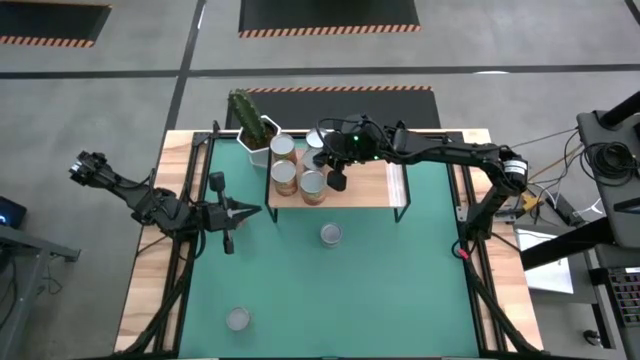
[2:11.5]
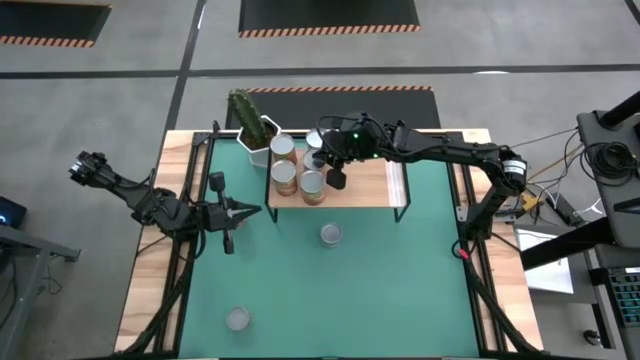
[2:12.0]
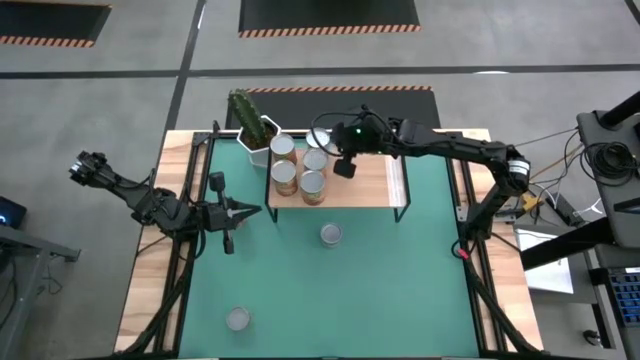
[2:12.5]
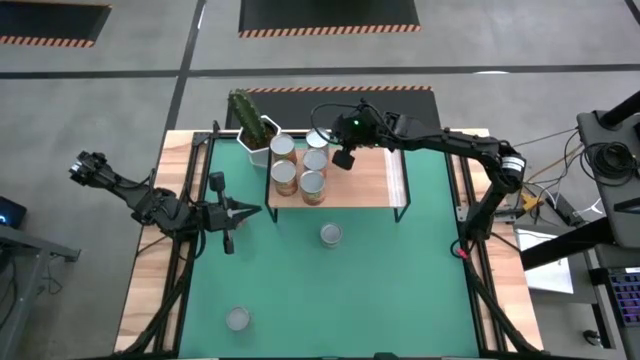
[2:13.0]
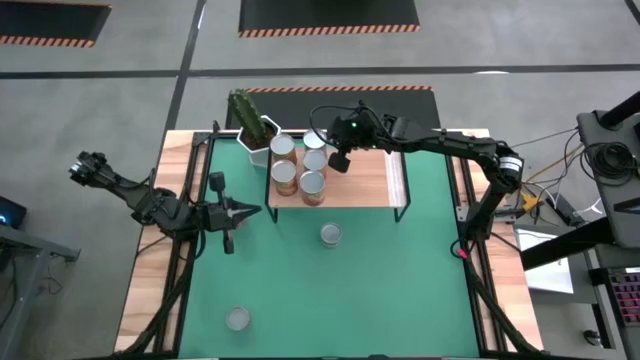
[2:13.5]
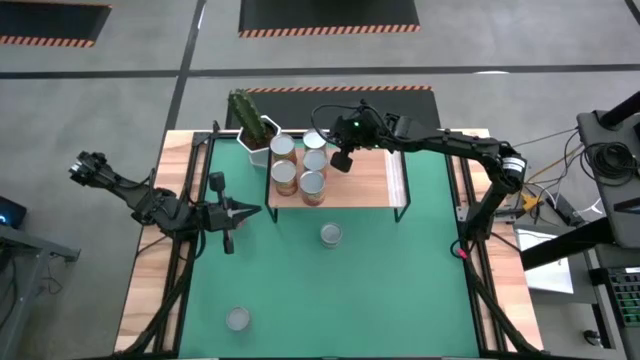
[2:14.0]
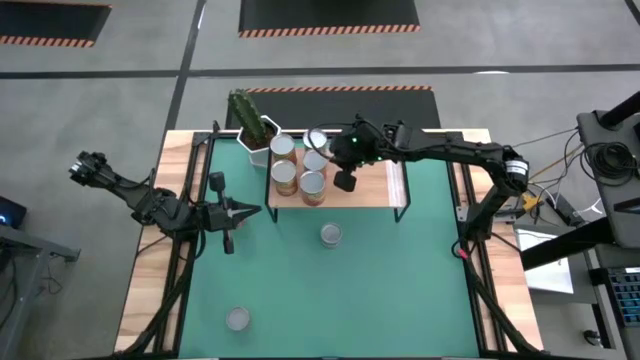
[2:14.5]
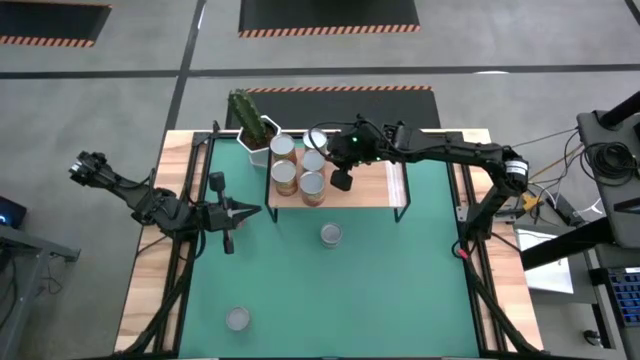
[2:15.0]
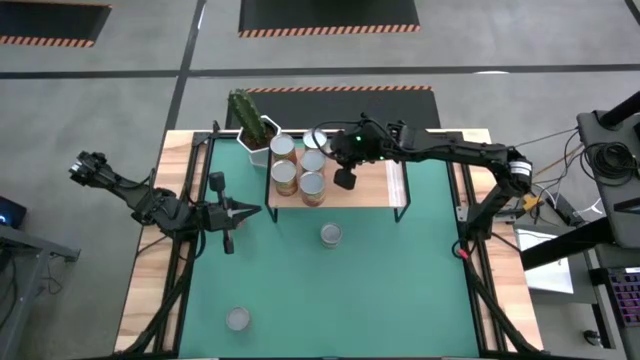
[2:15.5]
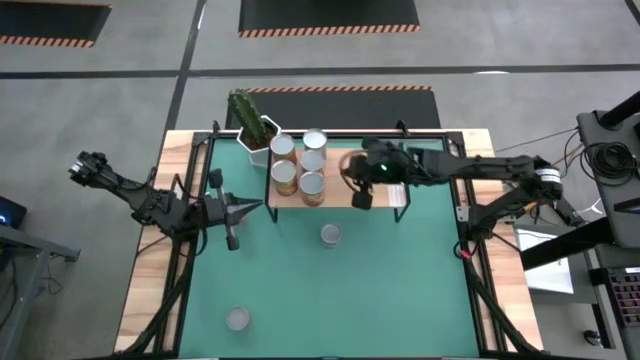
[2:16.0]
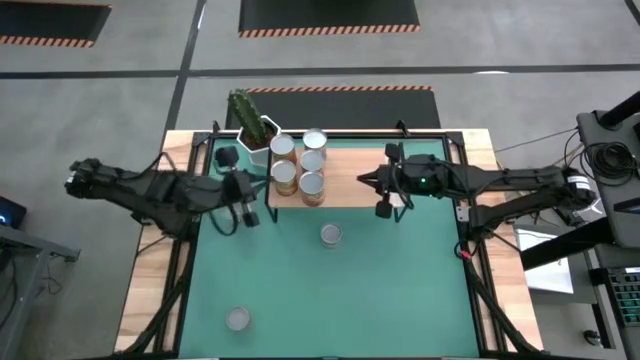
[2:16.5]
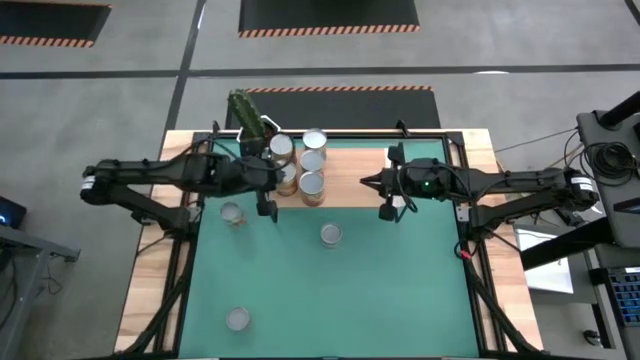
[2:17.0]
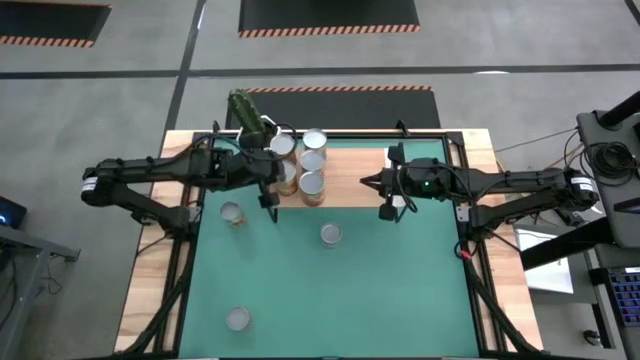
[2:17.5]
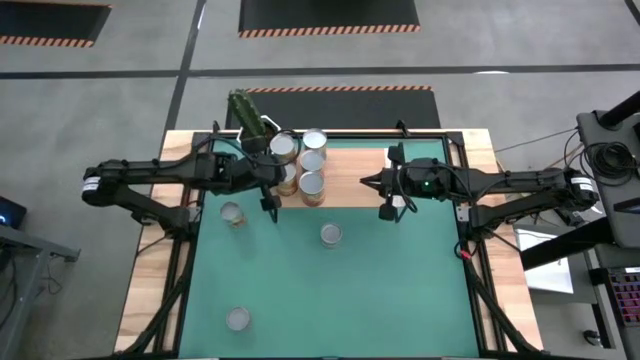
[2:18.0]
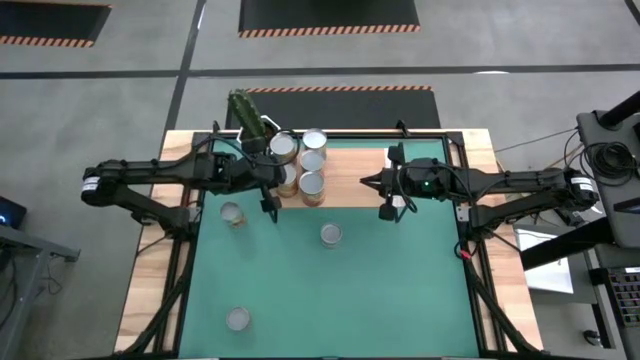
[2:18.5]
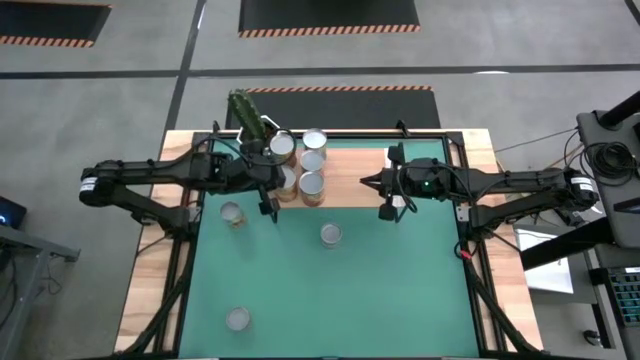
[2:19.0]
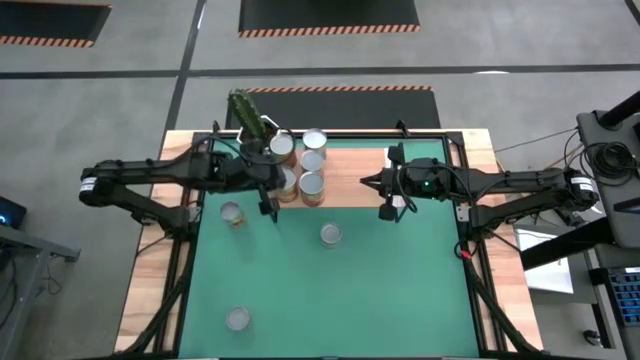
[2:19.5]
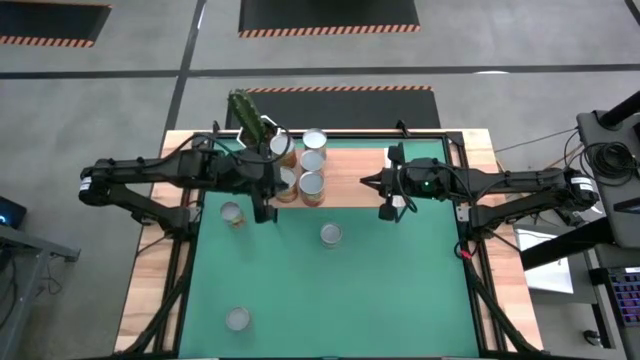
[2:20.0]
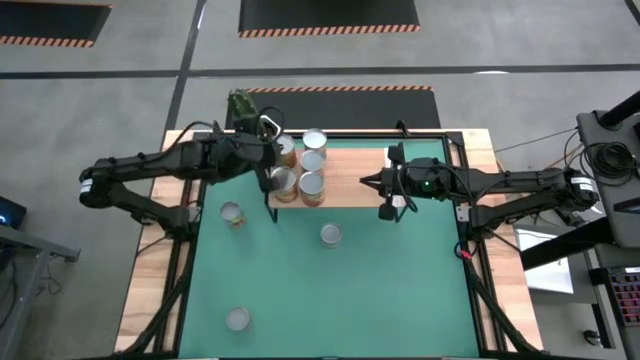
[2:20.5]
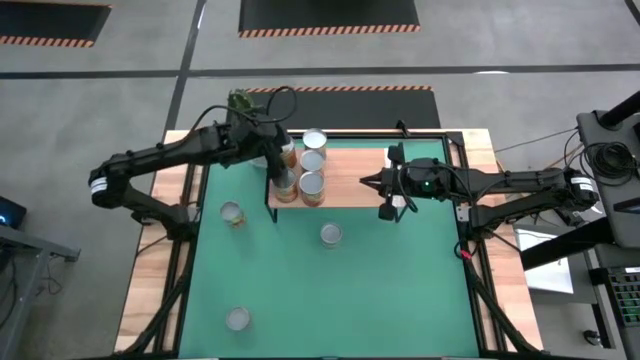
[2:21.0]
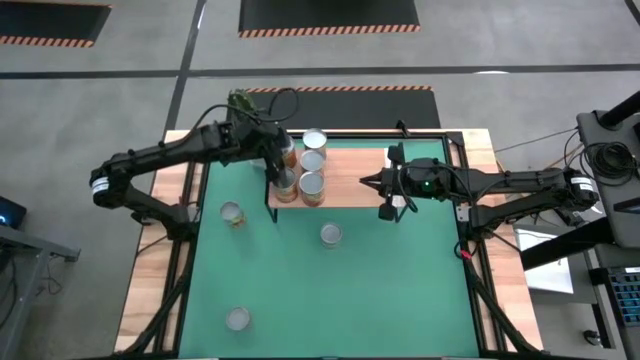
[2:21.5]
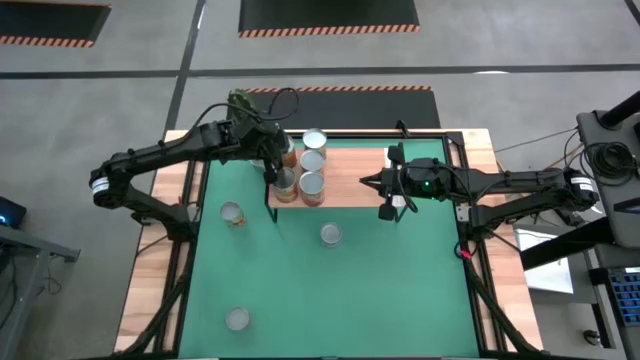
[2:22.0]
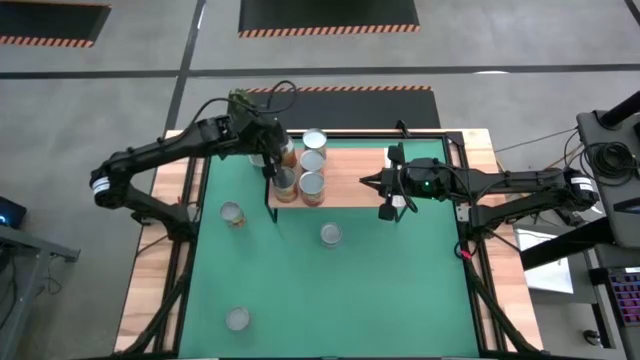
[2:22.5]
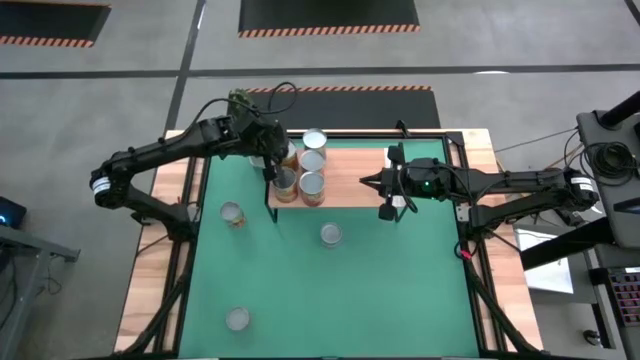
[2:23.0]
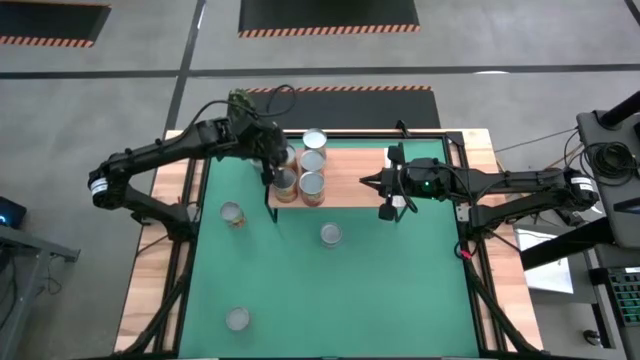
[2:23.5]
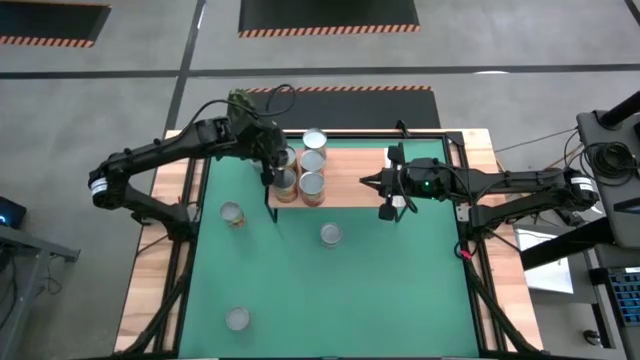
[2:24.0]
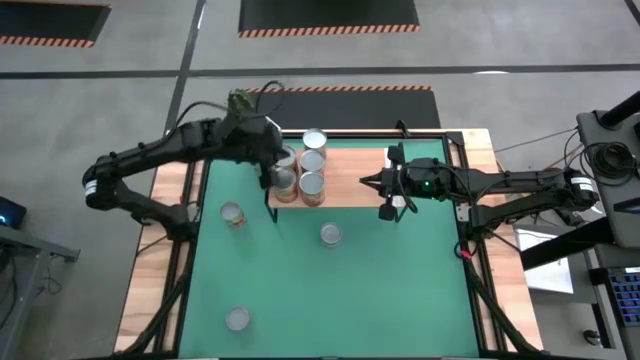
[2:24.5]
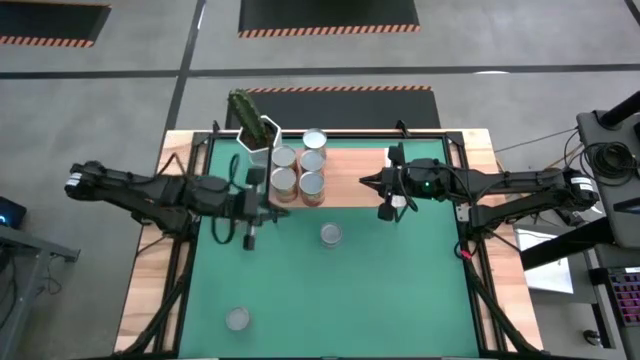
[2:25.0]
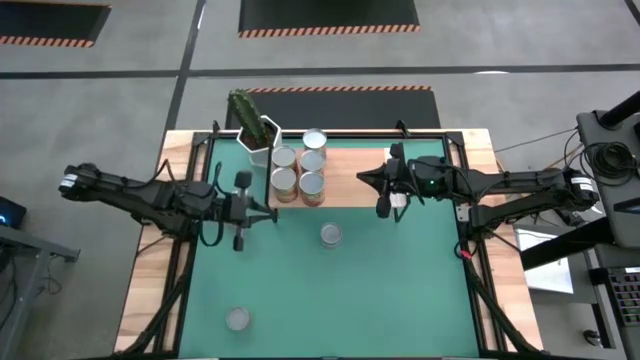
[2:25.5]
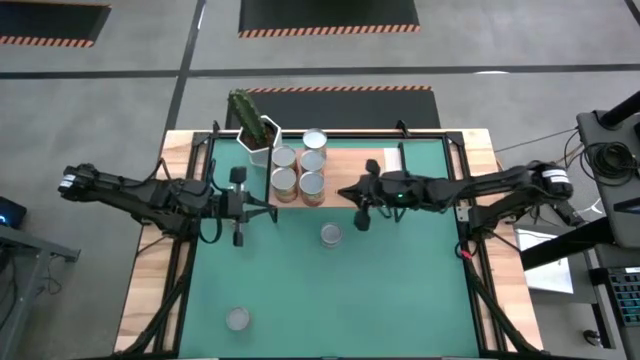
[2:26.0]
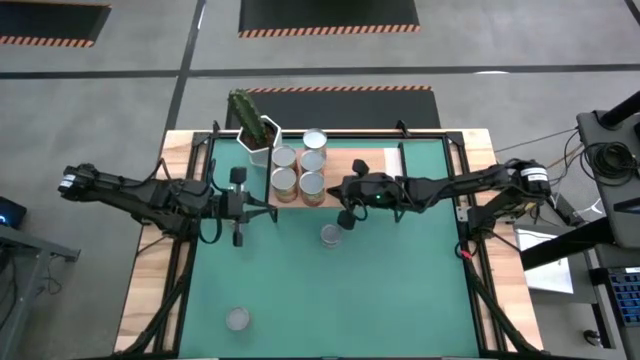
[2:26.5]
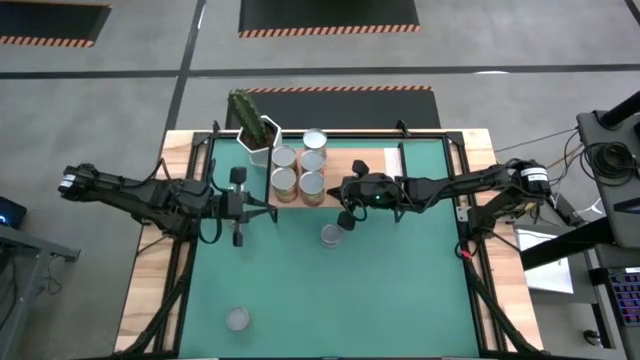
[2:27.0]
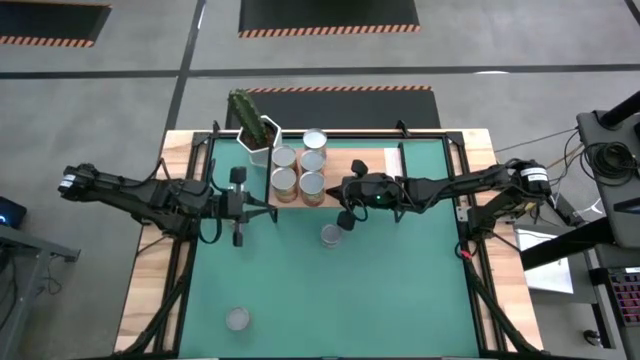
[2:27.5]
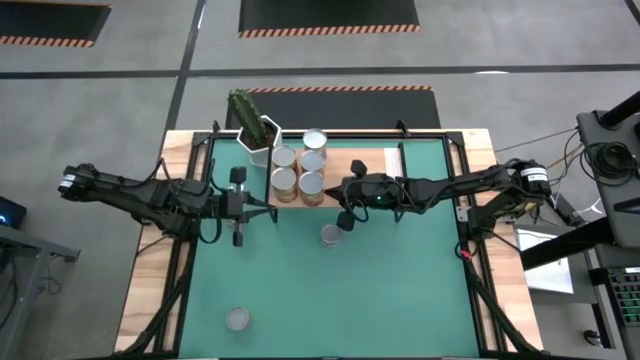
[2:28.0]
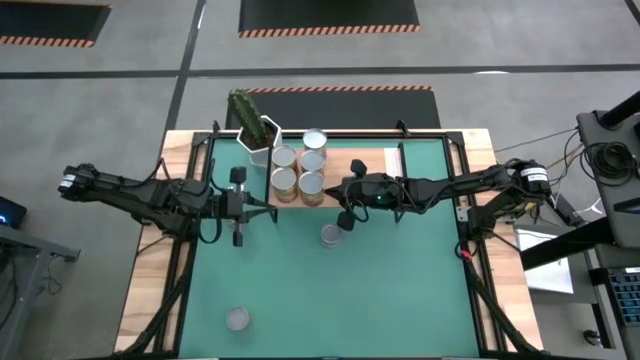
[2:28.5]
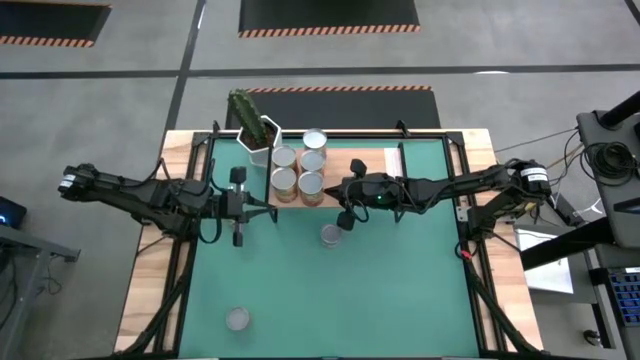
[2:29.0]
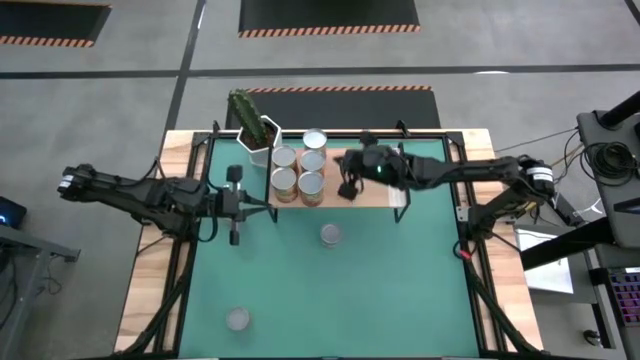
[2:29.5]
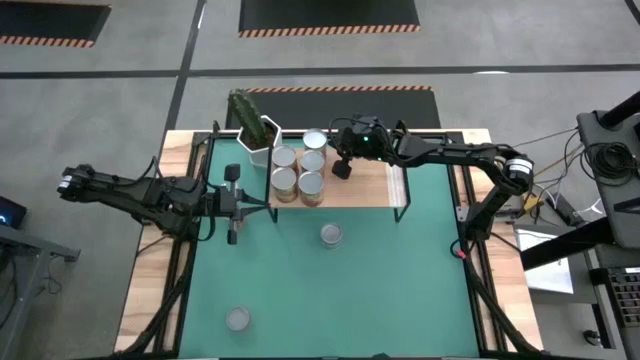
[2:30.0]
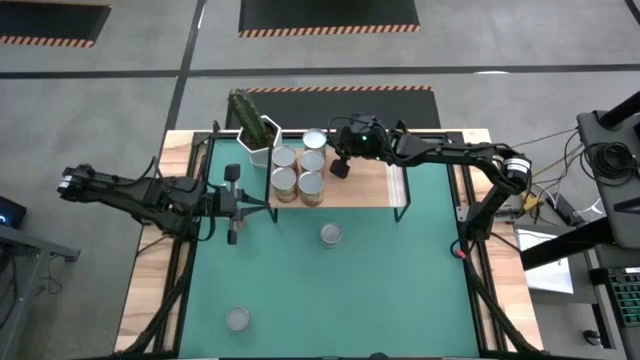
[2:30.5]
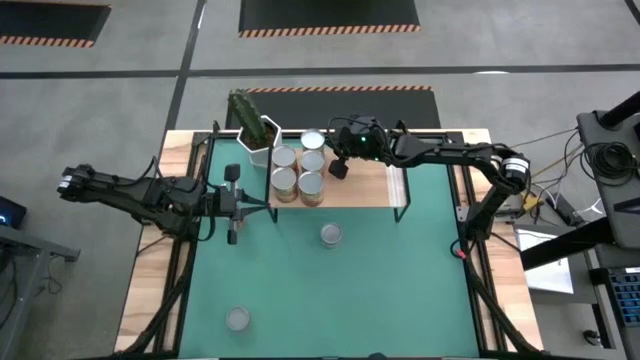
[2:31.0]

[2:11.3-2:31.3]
Task: Pick and place cans onto a shelf
Adjust the cans on the shelf

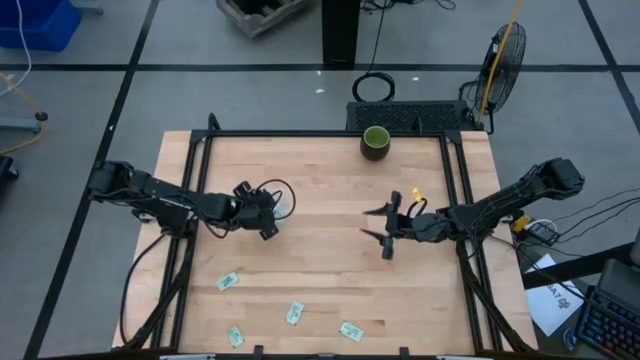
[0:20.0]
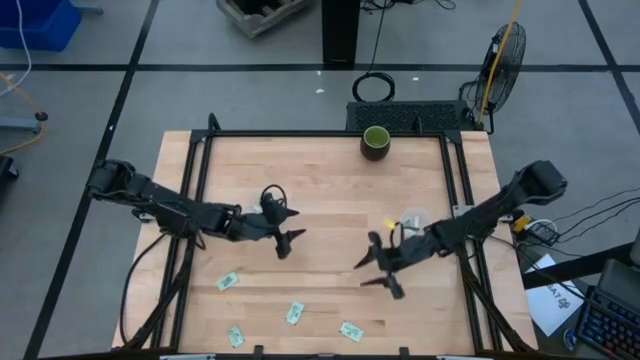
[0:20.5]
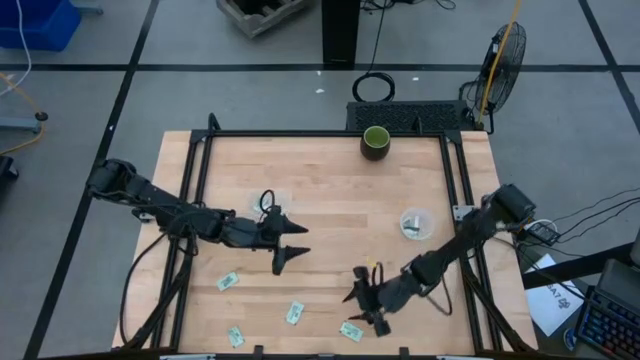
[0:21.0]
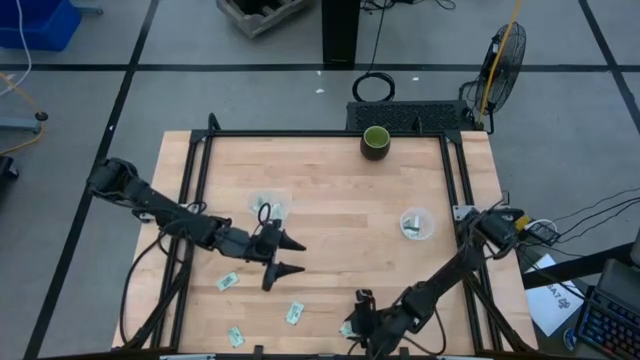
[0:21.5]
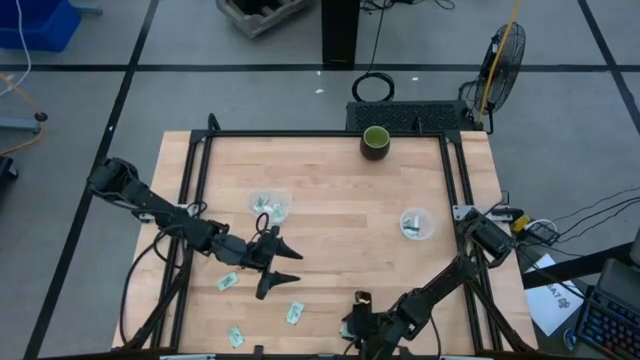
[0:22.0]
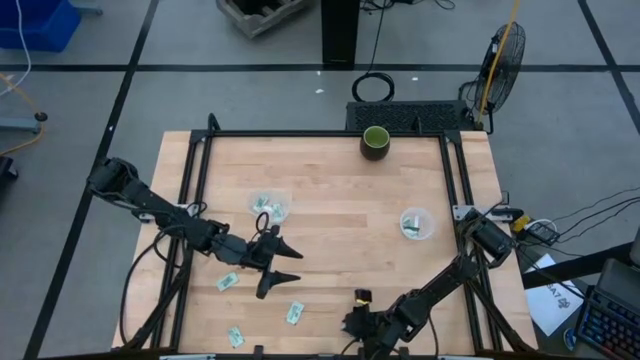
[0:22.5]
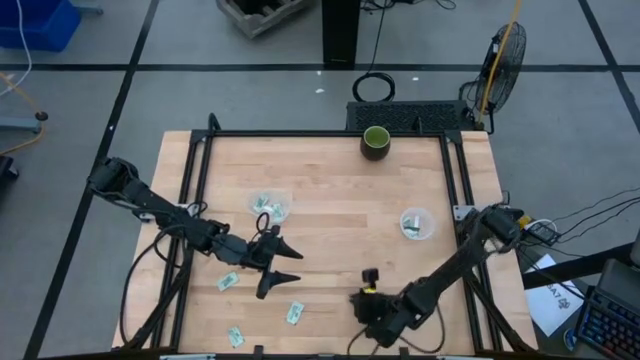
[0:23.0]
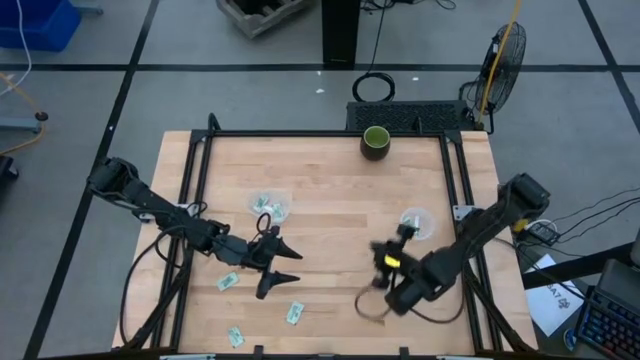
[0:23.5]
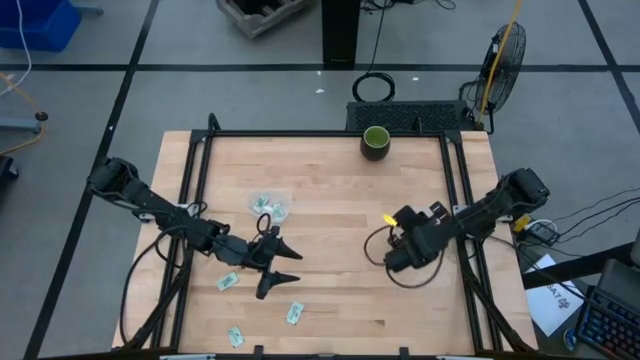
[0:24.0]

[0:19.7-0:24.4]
Task: Pick and place Stevia / Truvia into bins
Put the white stevia packet into the transparent circular container
